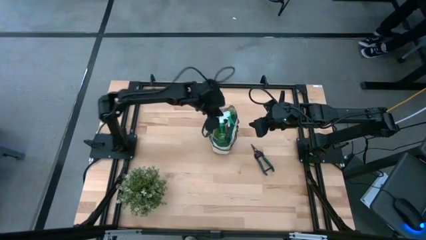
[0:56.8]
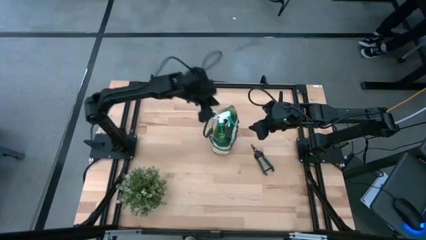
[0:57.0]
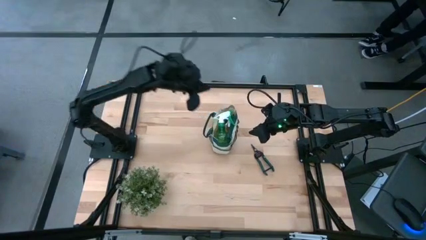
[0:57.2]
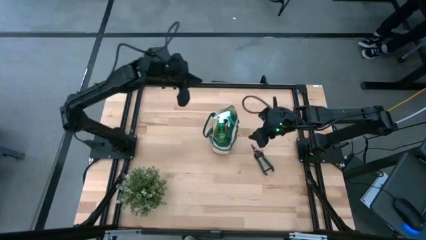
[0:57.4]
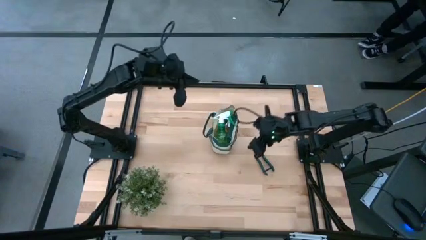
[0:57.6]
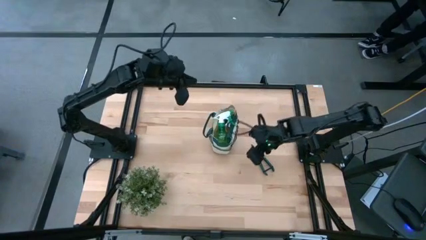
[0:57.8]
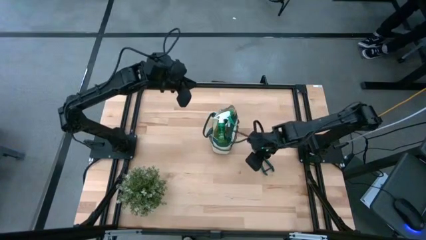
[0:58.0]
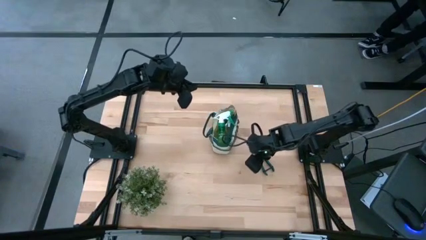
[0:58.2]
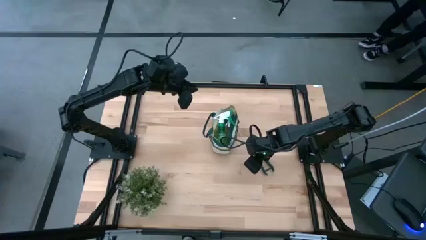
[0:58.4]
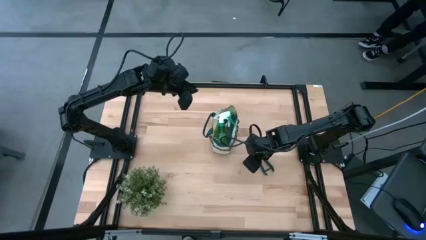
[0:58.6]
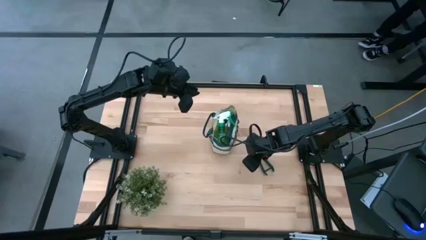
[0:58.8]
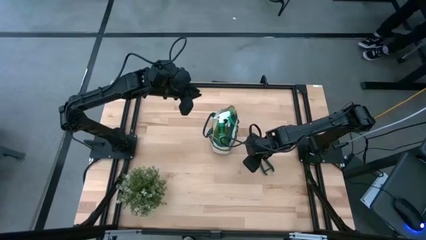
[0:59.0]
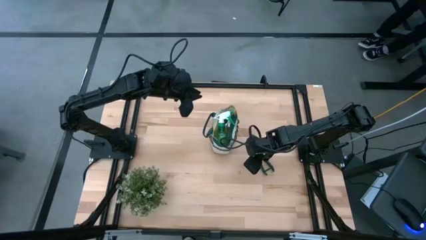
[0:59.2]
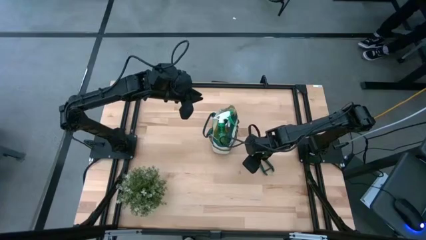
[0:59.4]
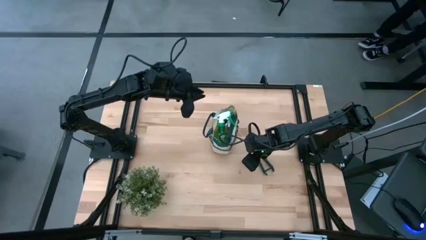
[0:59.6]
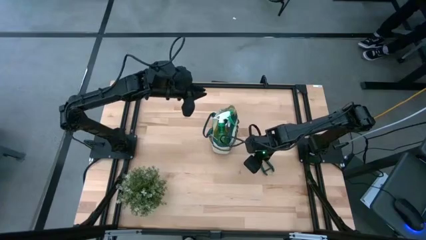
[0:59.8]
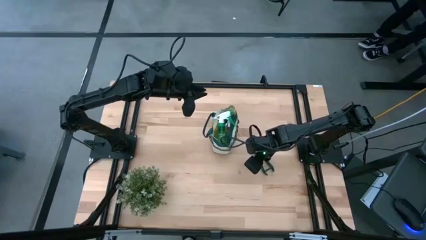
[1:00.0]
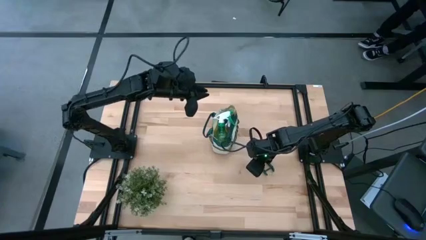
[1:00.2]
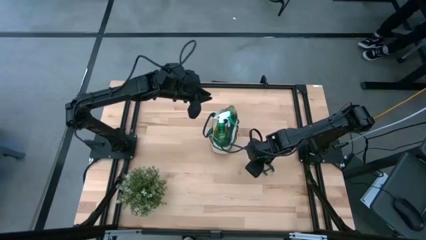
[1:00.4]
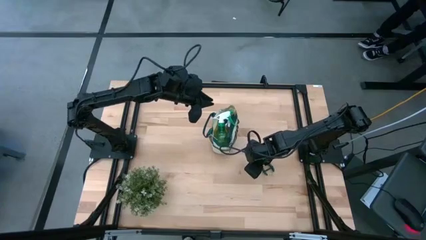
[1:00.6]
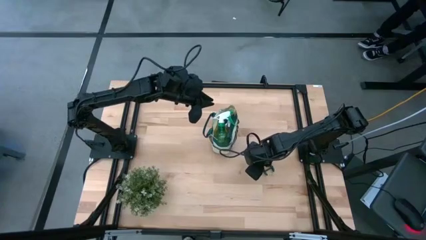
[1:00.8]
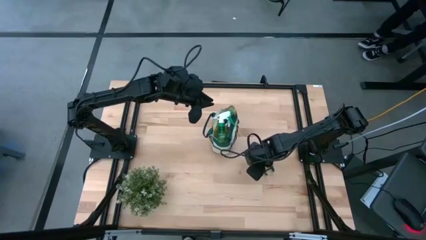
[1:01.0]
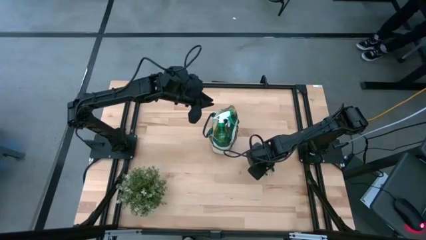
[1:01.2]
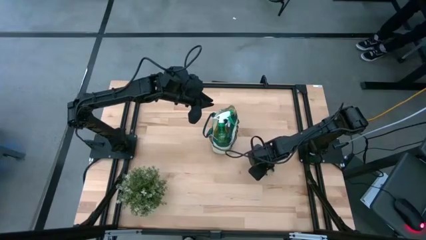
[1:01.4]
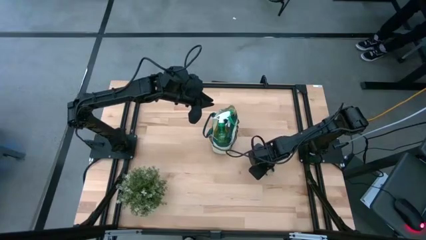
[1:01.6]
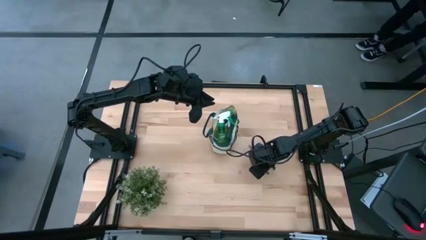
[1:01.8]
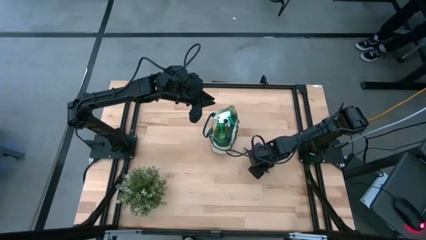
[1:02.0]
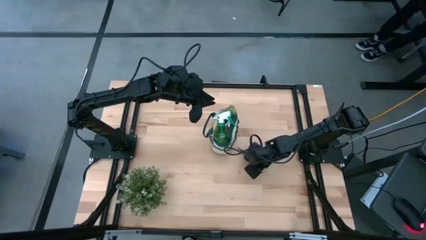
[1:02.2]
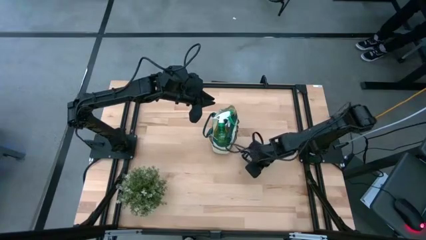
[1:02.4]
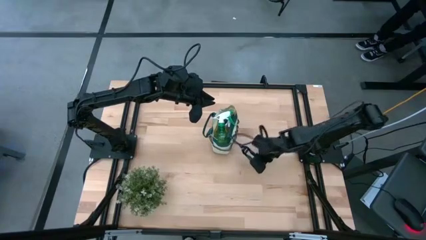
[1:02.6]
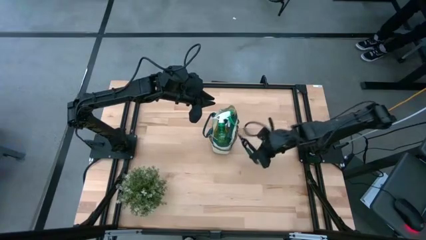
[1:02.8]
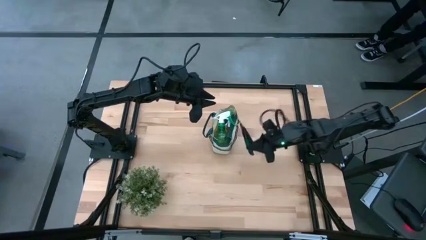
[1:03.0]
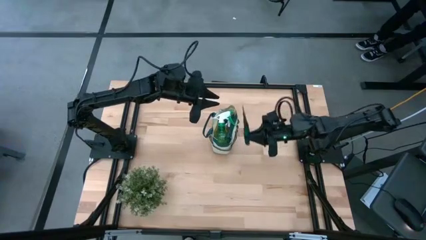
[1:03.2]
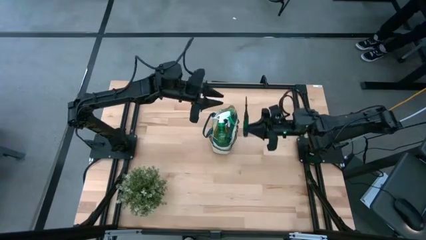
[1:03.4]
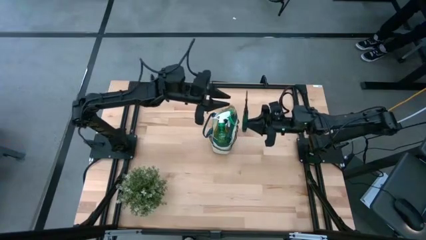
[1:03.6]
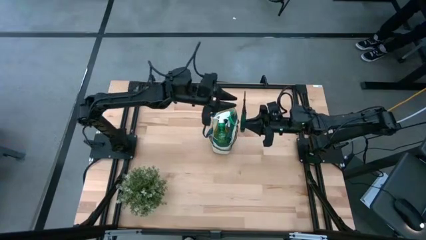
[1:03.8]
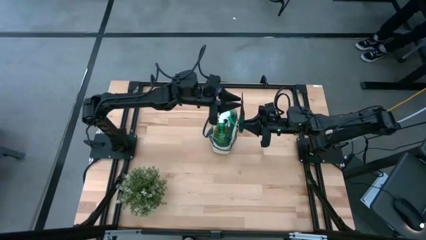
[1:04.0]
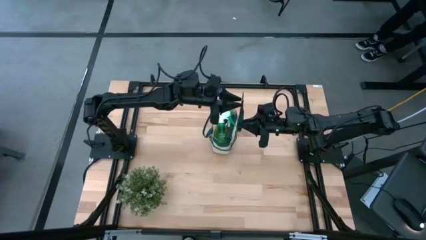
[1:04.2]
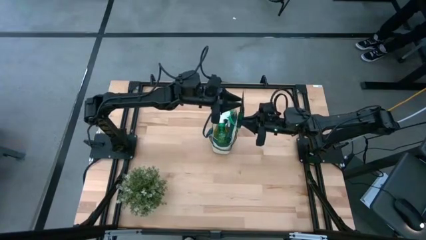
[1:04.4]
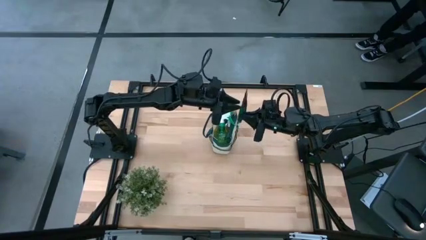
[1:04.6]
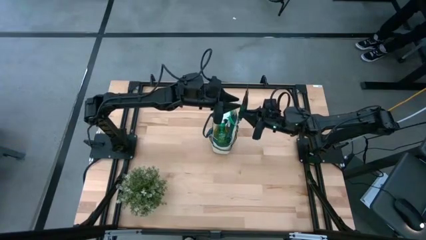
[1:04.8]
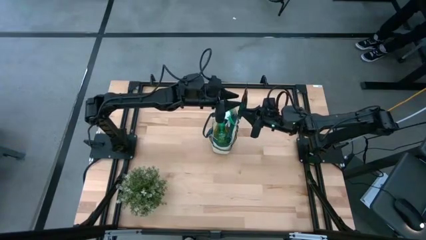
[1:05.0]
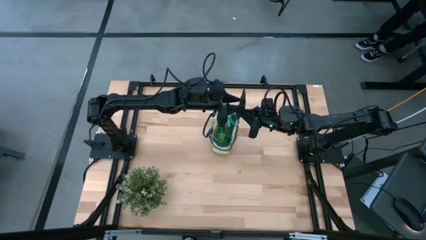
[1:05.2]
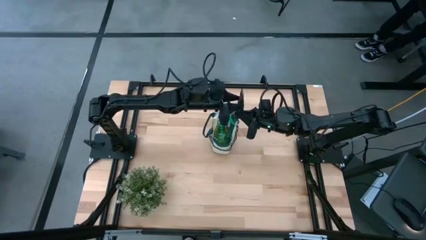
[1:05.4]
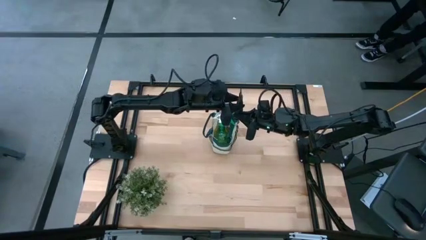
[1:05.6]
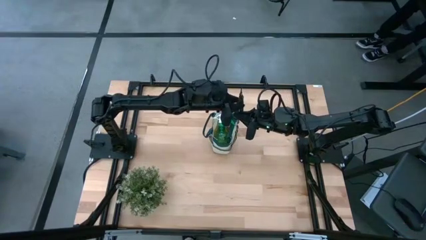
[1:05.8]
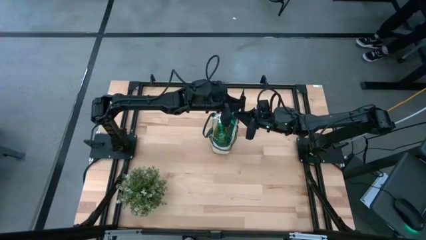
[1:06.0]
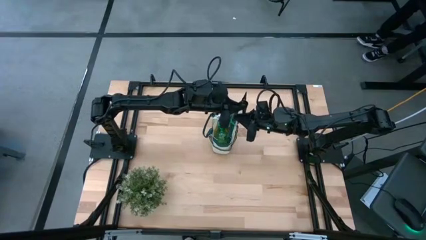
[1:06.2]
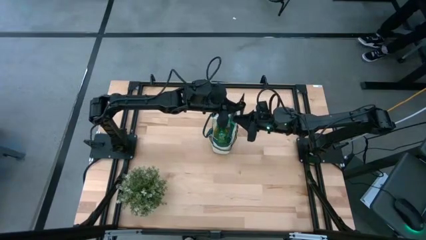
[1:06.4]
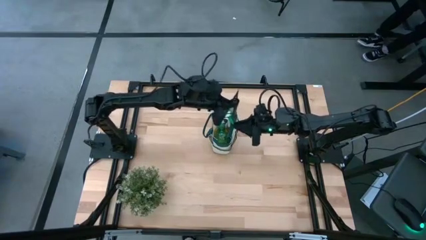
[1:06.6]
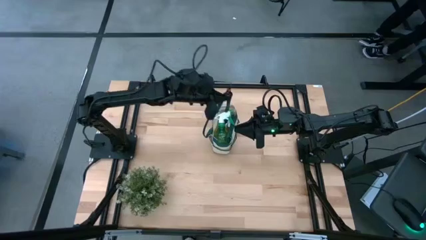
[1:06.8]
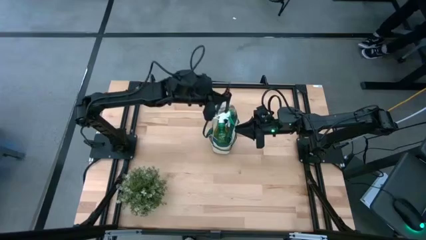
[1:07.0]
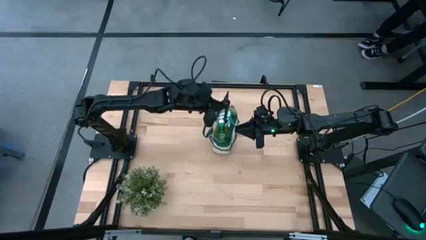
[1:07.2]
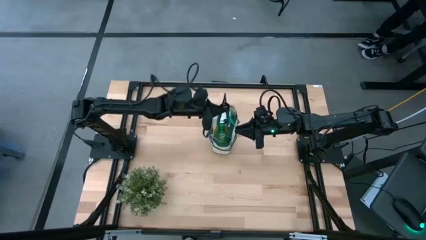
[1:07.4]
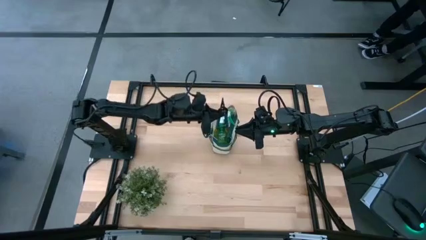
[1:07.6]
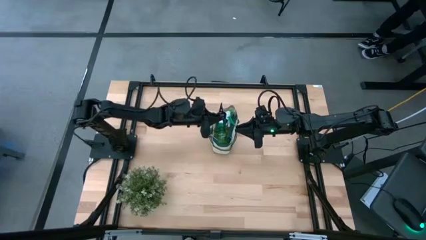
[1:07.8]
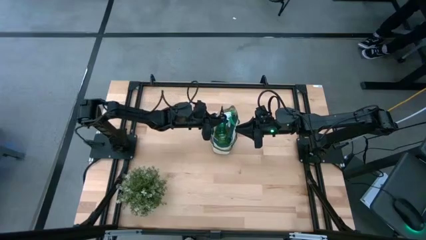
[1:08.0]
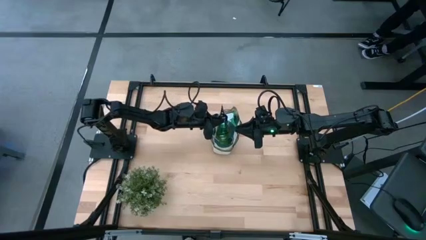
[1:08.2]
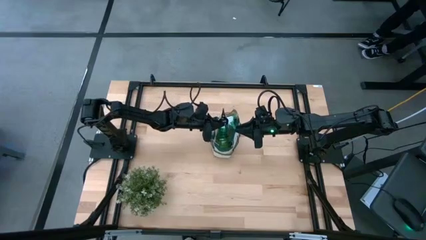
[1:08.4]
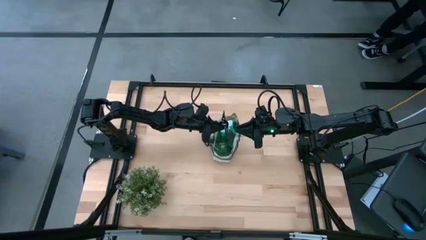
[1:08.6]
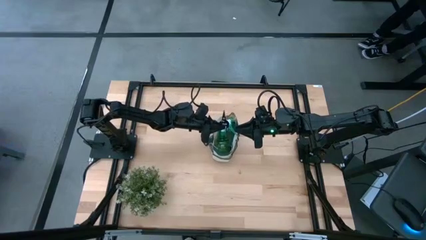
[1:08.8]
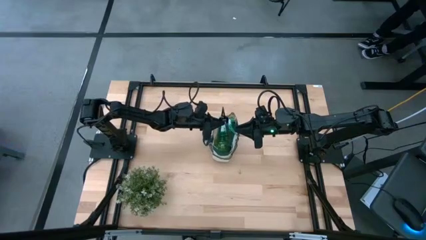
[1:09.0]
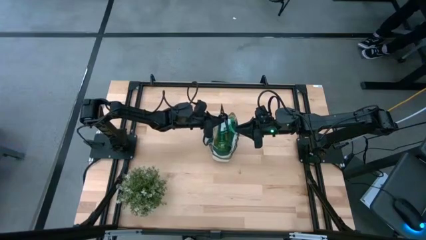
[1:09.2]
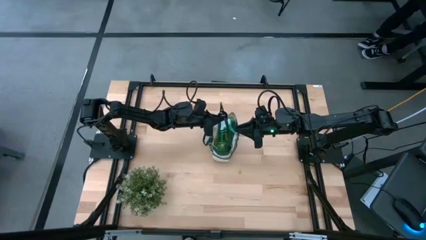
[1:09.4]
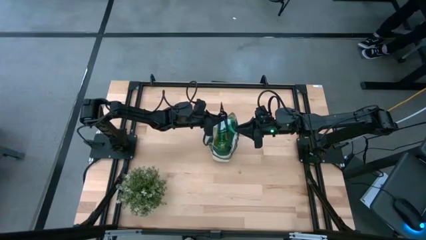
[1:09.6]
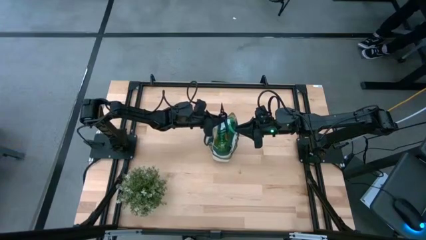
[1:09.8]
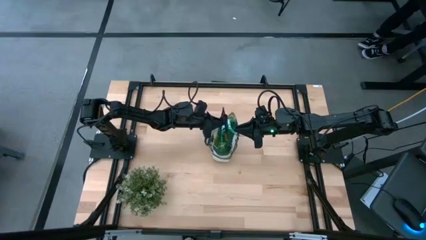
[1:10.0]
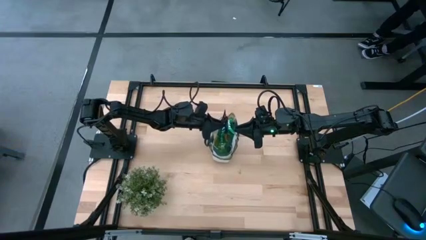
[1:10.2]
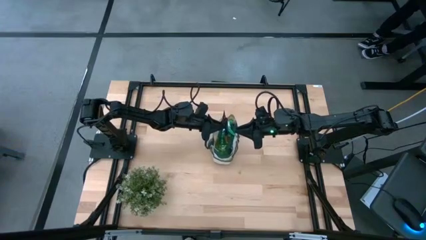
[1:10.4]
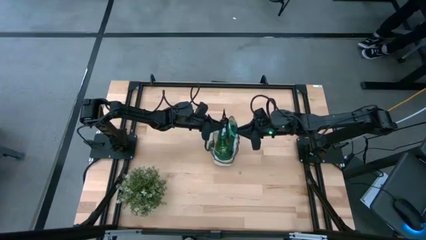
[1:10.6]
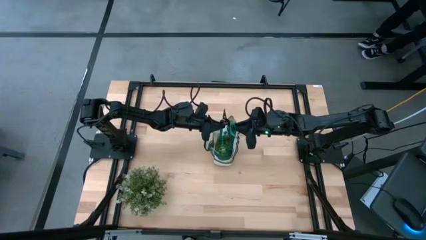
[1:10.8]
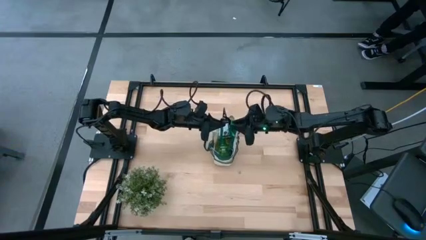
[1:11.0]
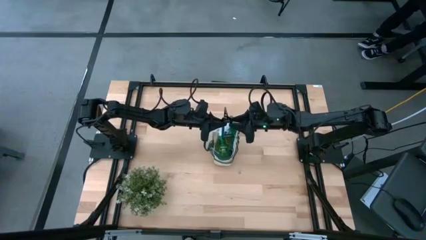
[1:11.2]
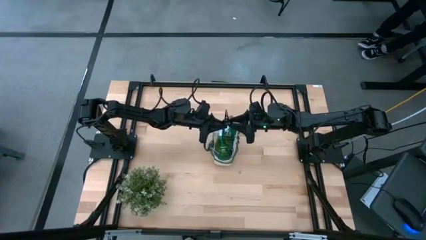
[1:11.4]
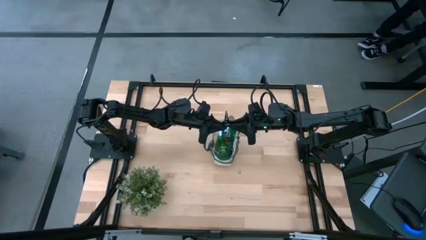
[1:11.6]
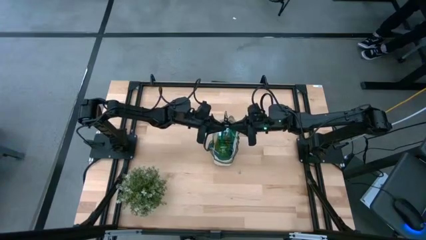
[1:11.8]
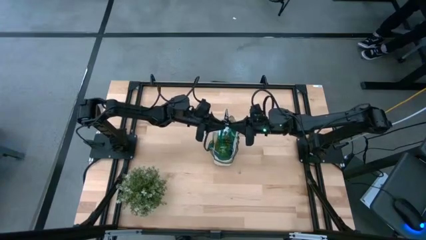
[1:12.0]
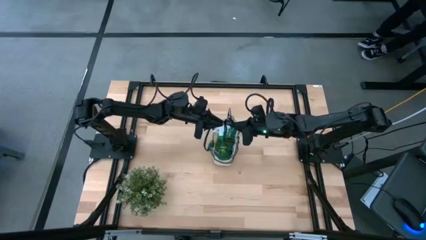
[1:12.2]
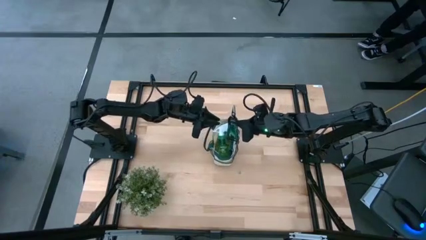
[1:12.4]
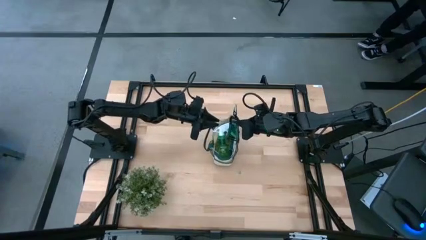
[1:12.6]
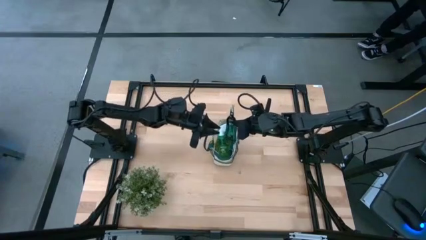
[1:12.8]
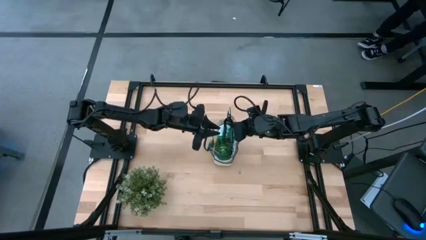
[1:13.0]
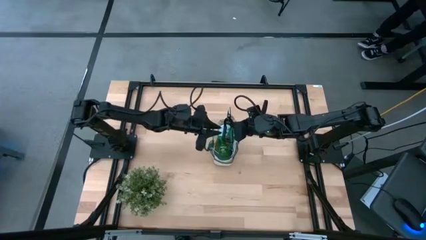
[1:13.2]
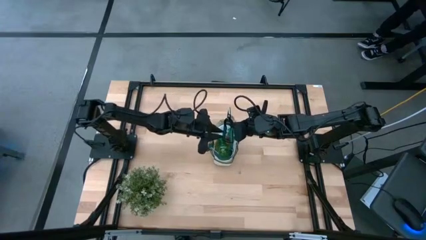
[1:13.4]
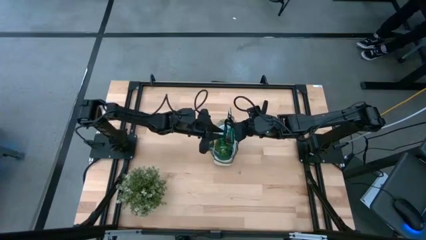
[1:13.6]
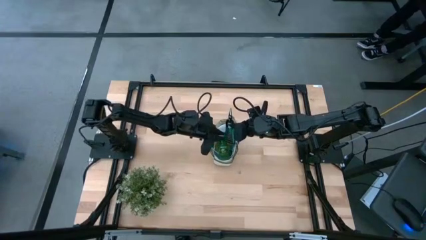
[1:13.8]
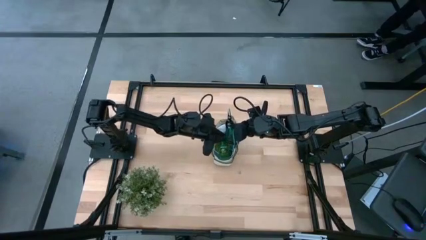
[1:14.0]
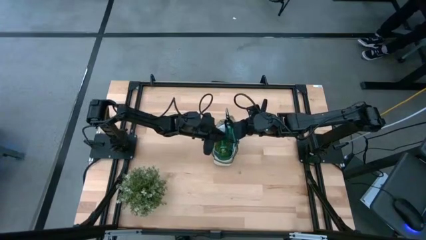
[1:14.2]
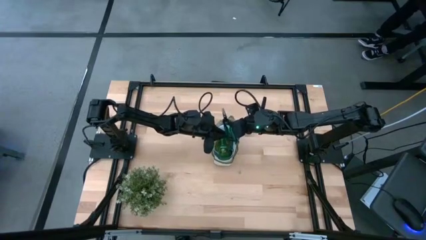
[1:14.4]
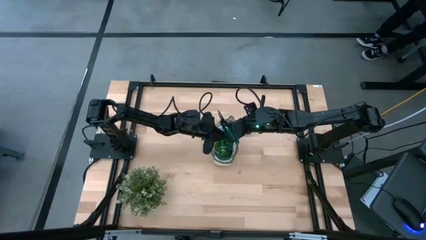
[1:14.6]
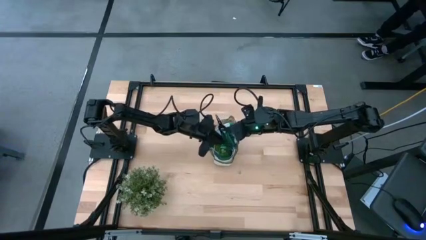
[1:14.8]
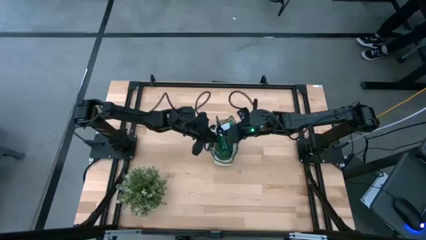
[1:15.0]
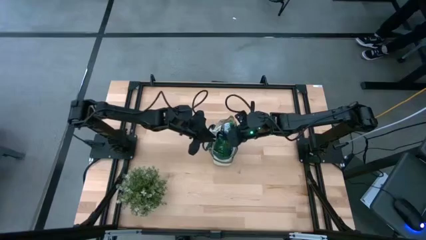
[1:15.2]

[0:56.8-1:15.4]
Task: Pick & Place Garden tools in Gardening bag
Put the fruit pruner into the gardening bag
